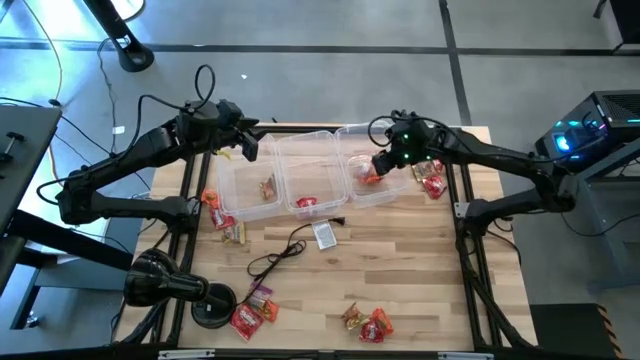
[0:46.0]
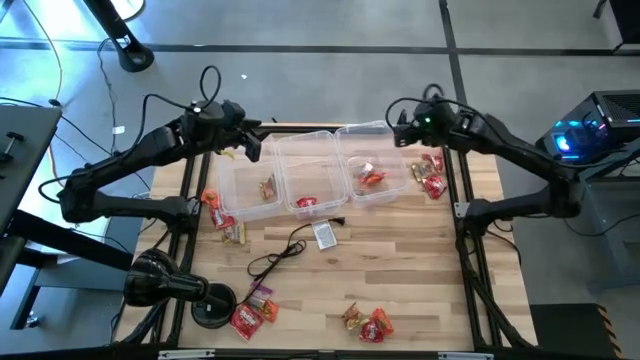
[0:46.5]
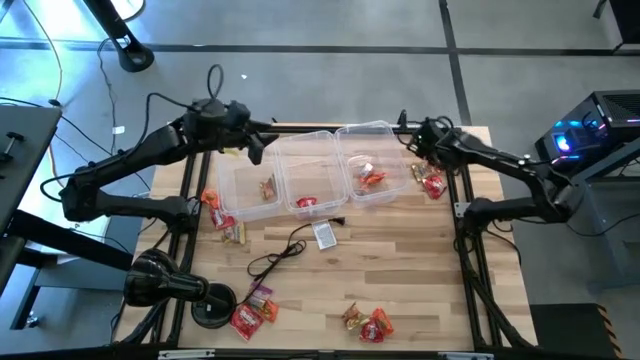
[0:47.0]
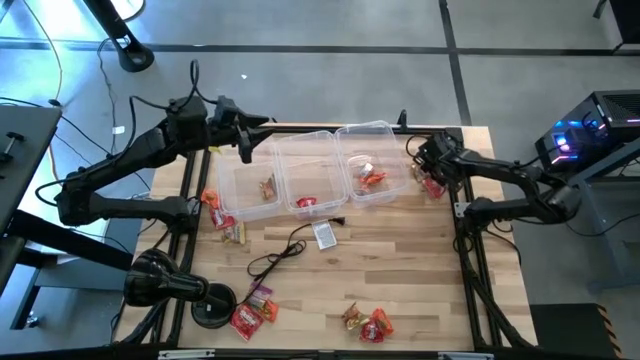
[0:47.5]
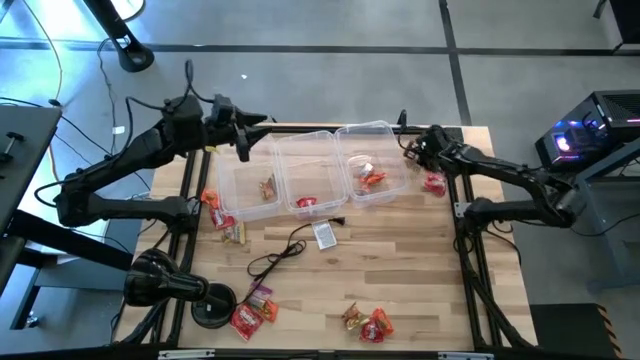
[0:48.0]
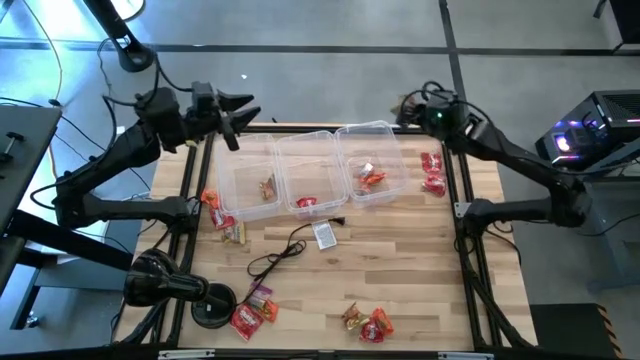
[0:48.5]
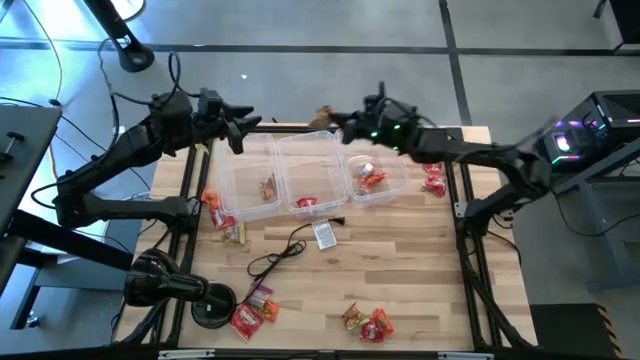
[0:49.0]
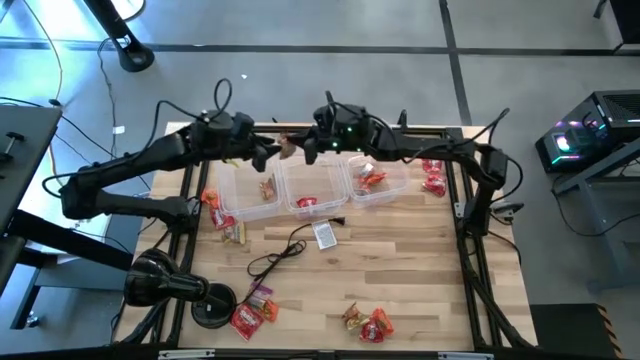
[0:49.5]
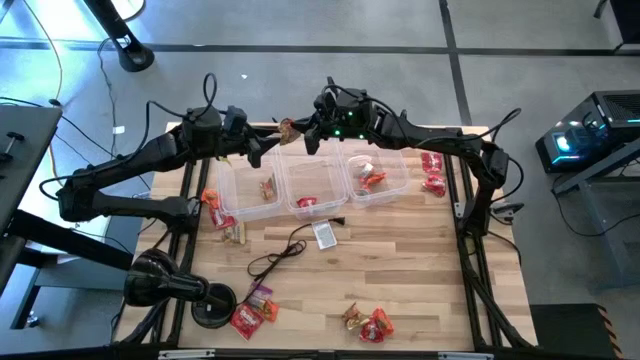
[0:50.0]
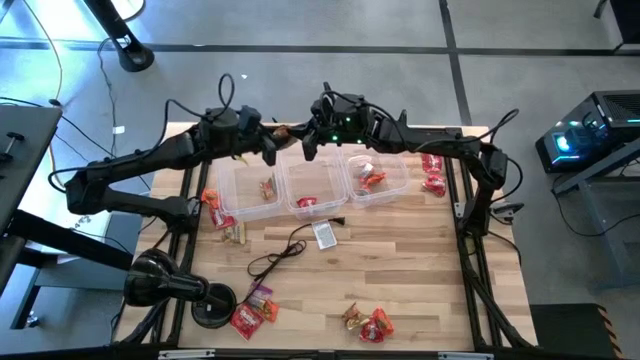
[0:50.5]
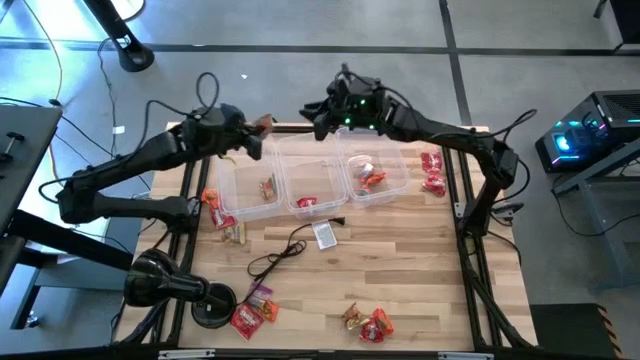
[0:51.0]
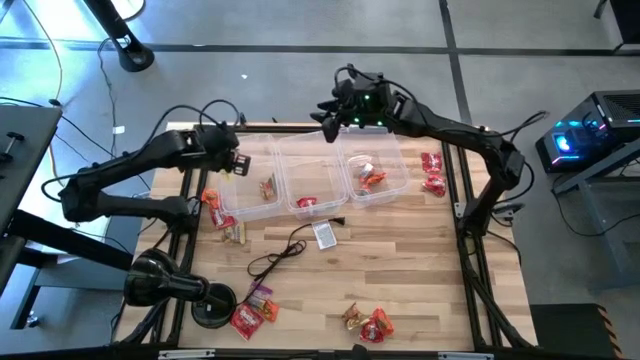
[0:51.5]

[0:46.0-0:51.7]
Task: Sort candy
Put the gold candy pack into the left transparent bin

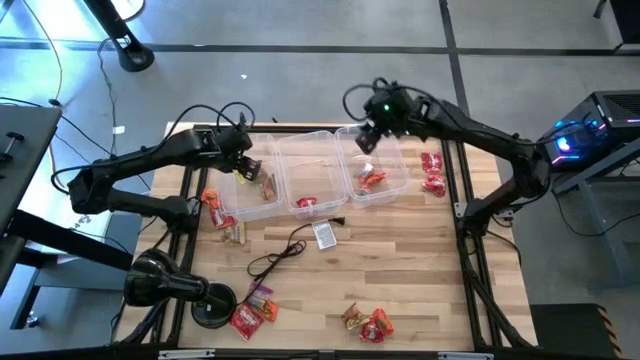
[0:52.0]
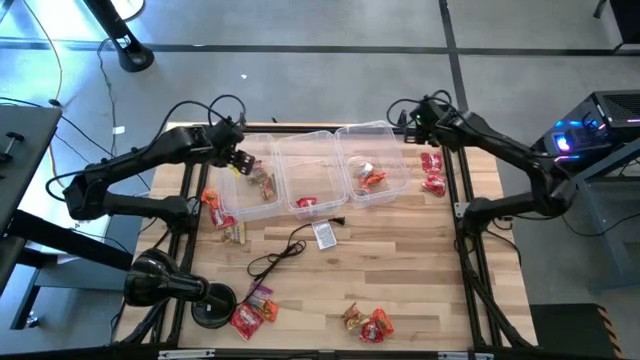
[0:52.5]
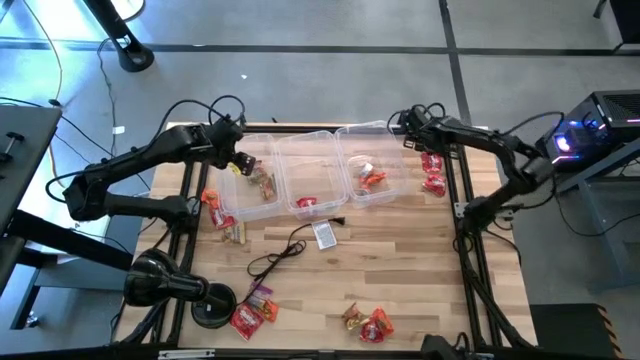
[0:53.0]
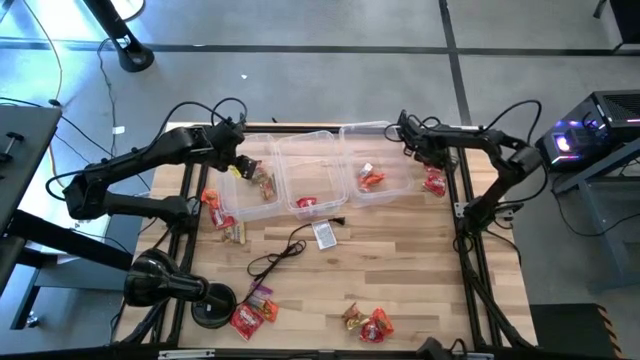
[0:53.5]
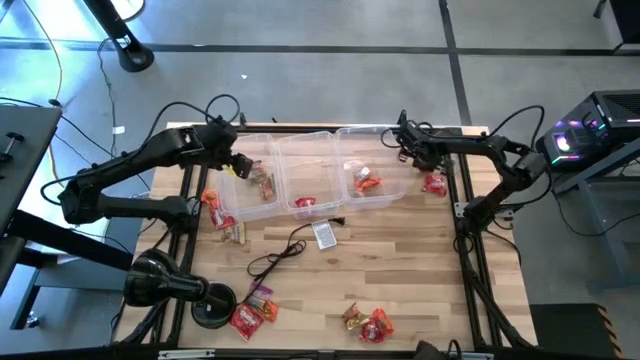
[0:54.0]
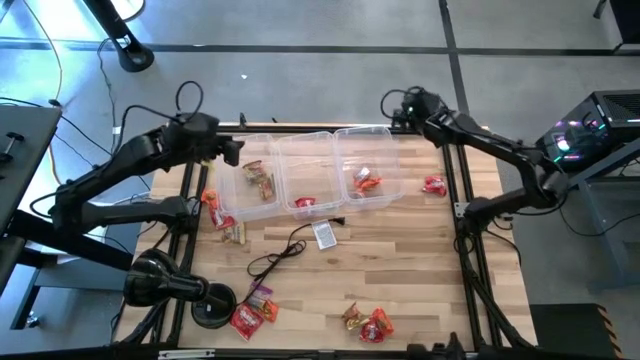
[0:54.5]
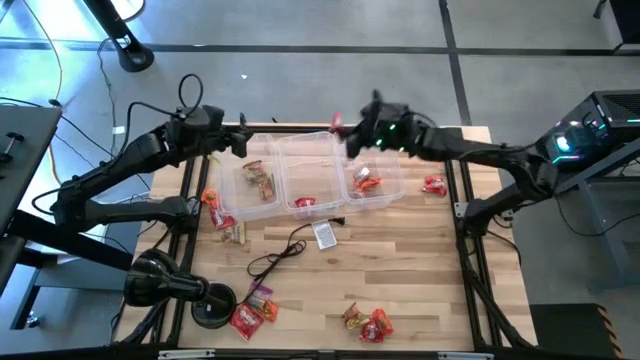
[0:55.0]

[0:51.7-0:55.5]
Put the red candy pack into the middle transparent bin

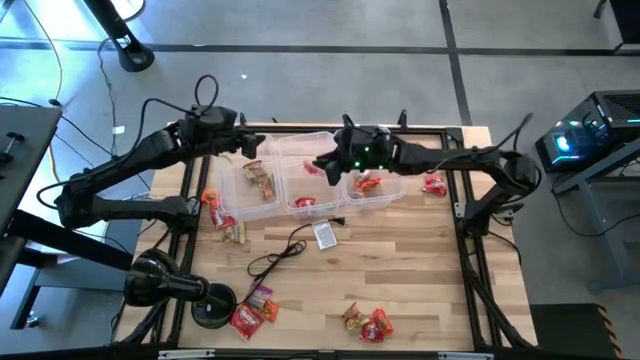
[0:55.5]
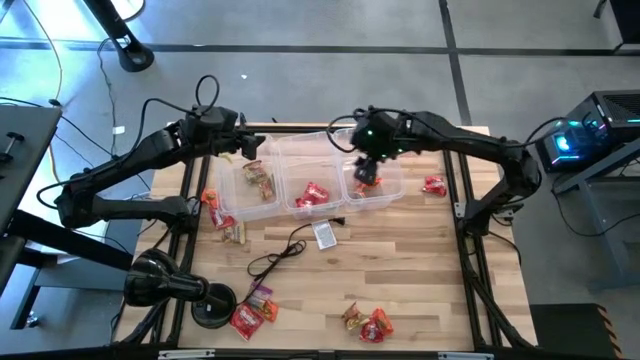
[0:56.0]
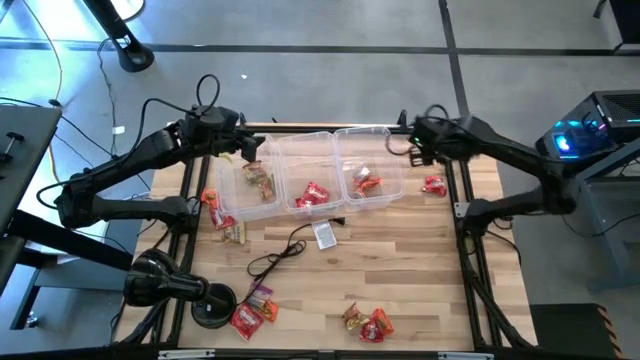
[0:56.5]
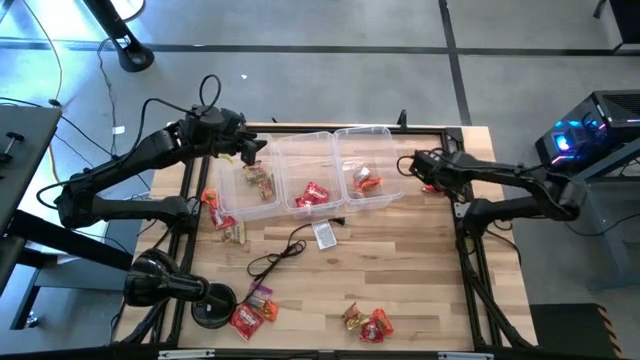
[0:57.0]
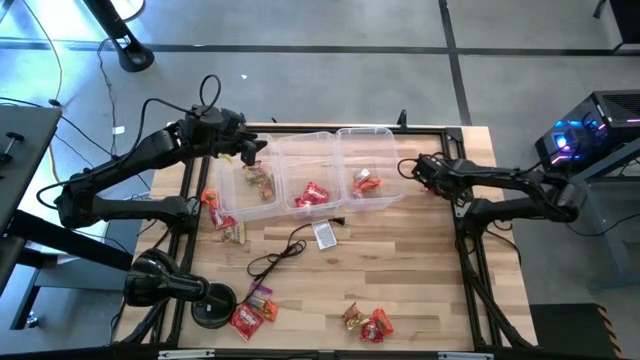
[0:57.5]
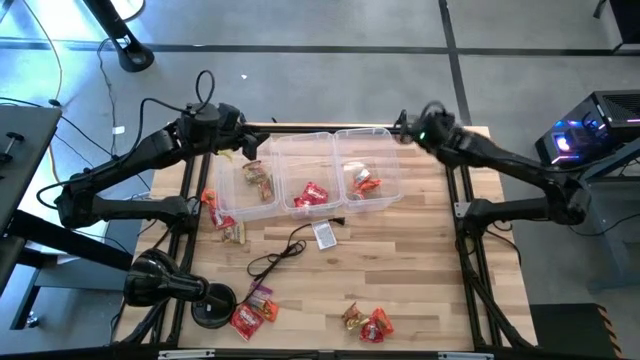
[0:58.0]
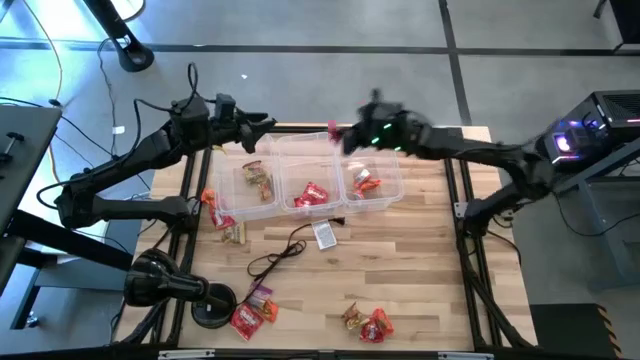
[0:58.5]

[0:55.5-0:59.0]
Put the red candy pack into the middle transparent bin

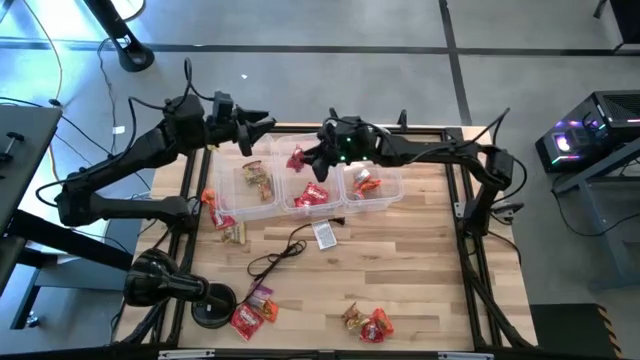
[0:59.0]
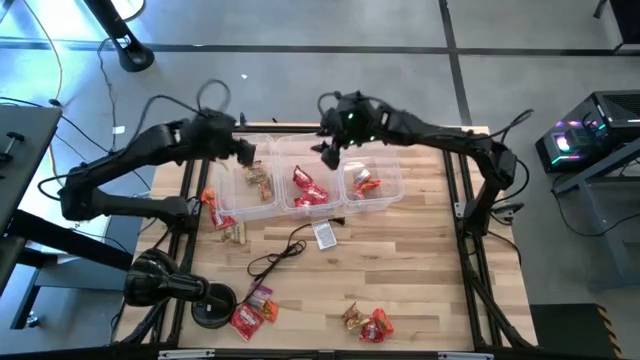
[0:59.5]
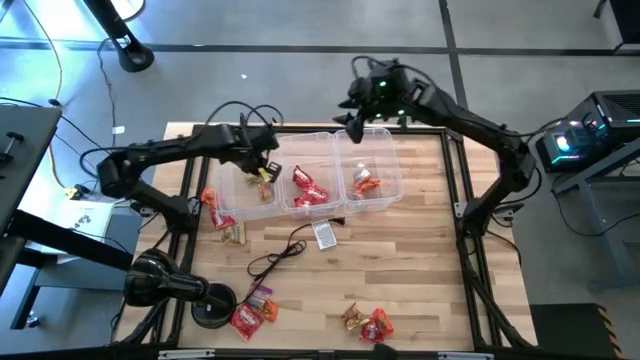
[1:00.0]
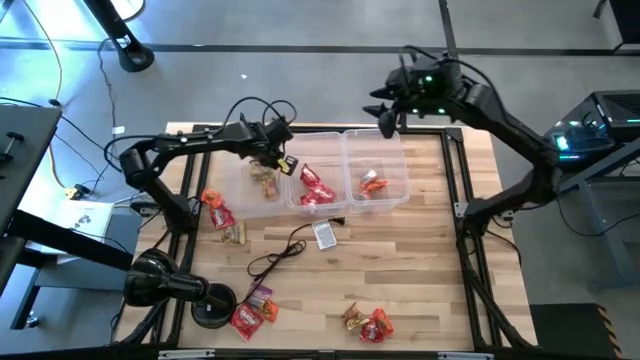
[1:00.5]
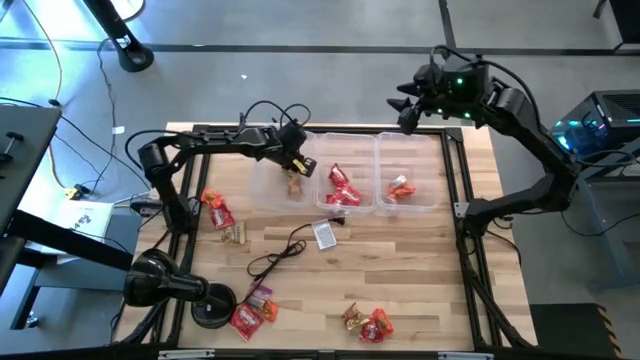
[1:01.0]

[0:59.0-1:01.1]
Adjust the transparent bins

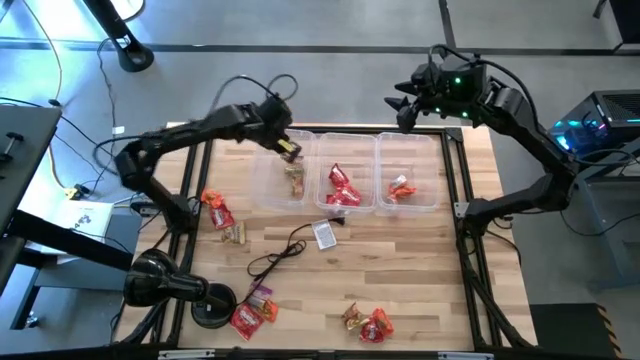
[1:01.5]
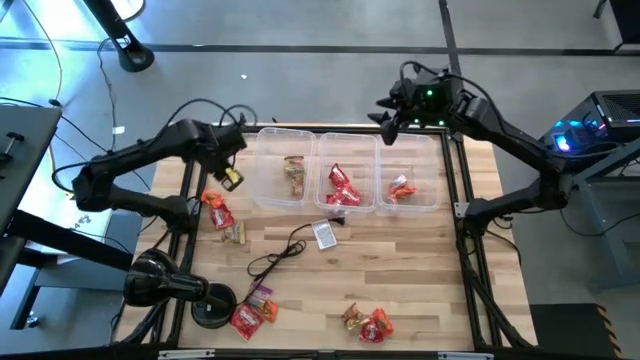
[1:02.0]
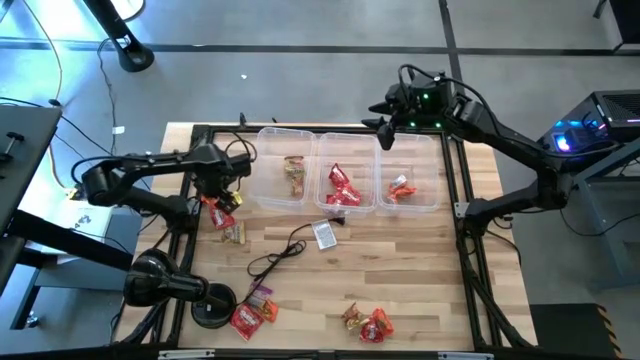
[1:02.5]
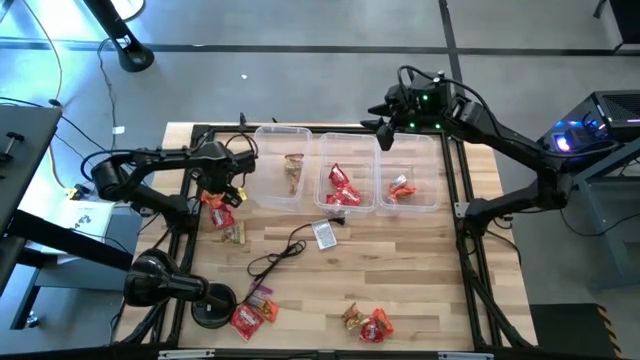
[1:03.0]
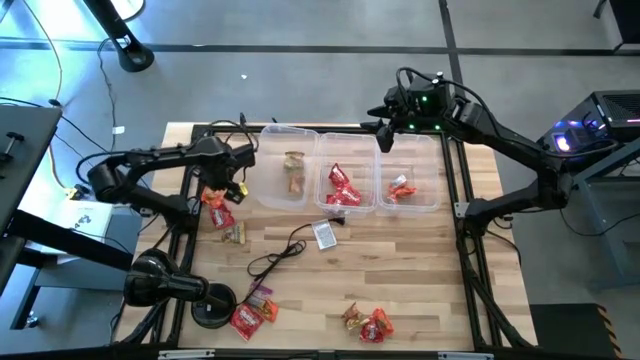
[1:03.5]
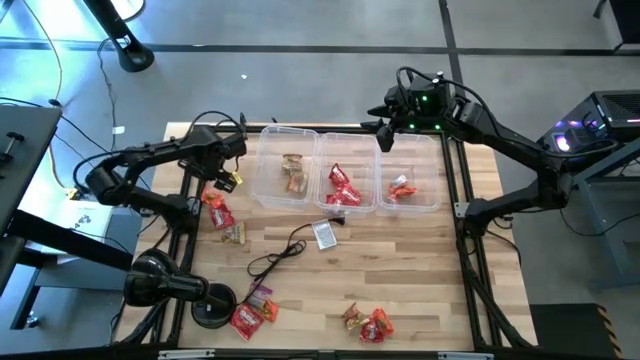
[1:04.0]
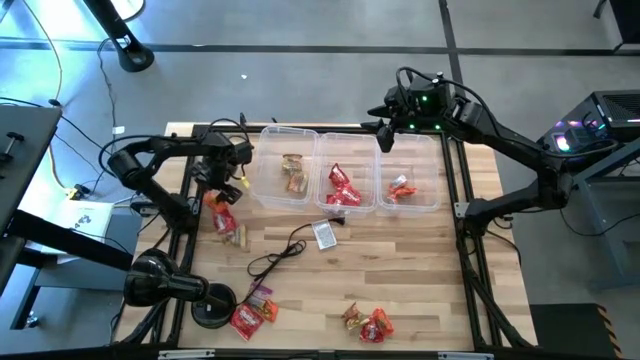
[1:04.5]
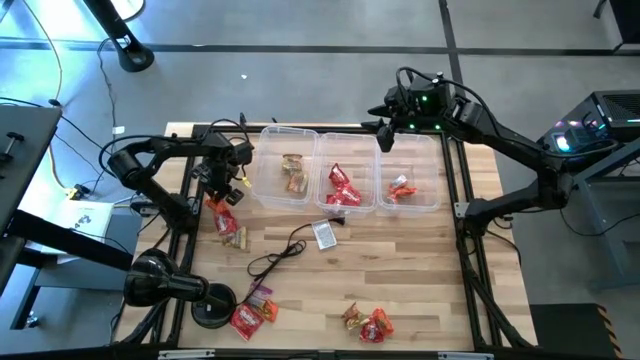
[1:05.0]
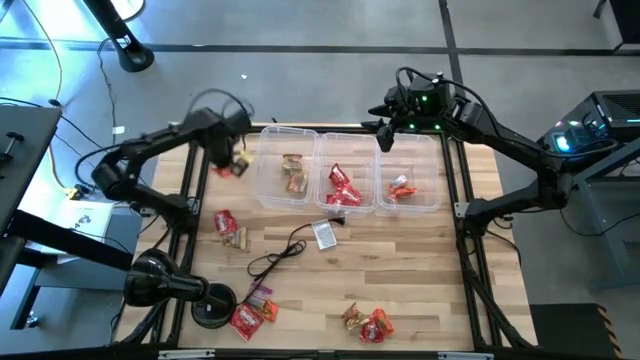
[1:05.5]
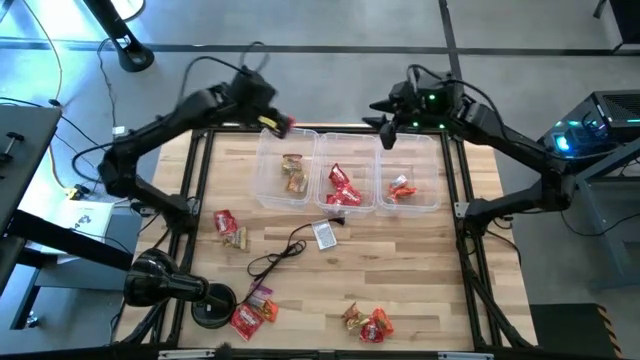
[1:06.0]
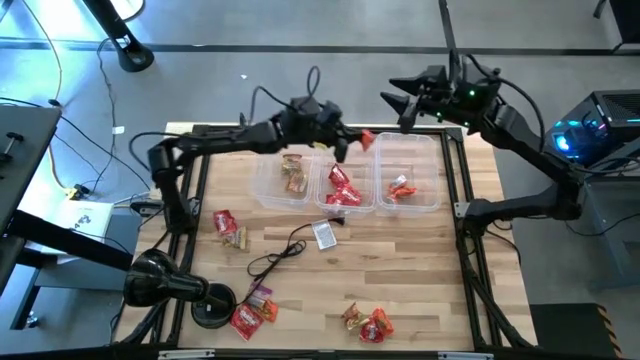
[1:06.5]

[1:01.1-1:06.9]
Put the orange candy pack into the right transparent bin
